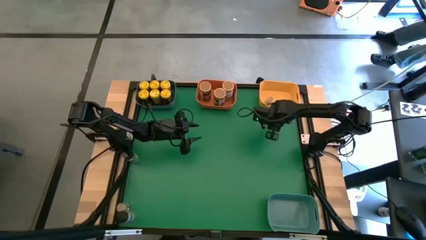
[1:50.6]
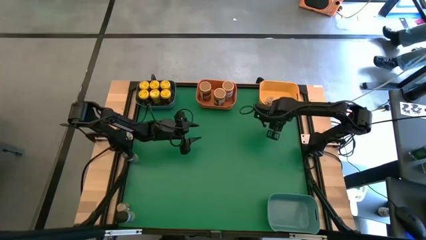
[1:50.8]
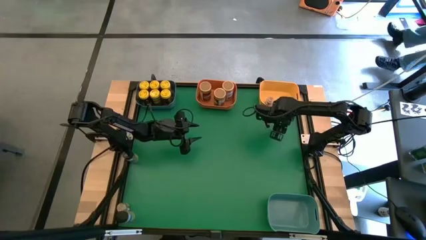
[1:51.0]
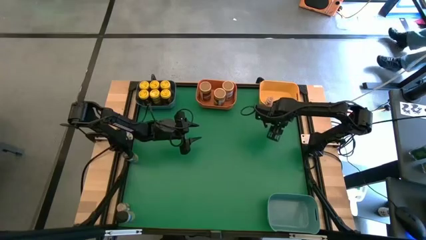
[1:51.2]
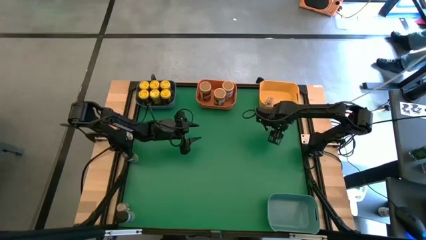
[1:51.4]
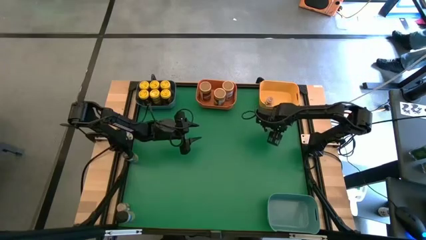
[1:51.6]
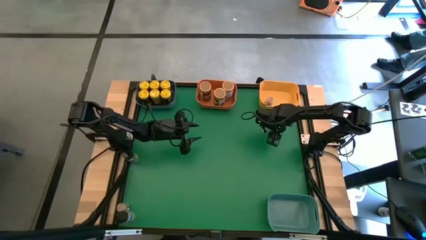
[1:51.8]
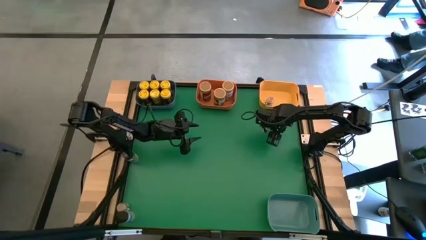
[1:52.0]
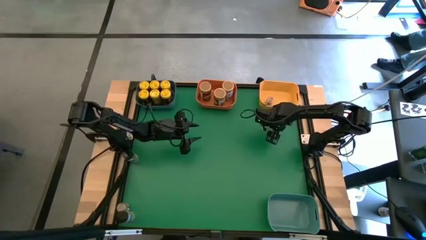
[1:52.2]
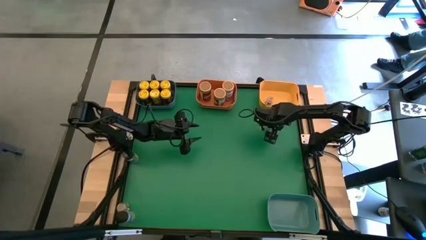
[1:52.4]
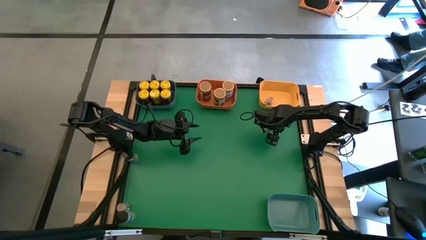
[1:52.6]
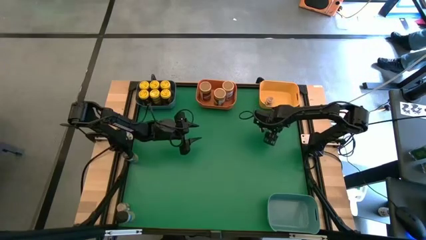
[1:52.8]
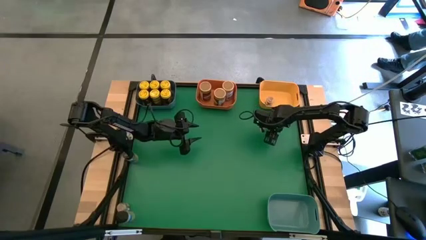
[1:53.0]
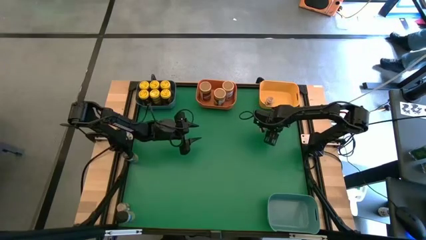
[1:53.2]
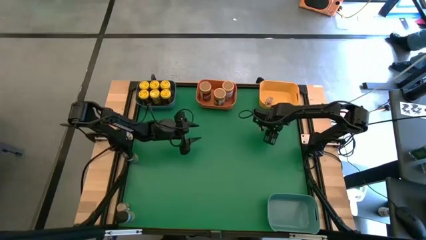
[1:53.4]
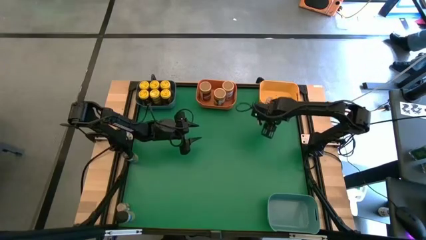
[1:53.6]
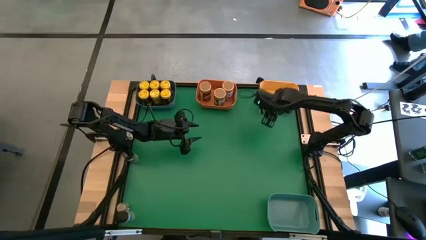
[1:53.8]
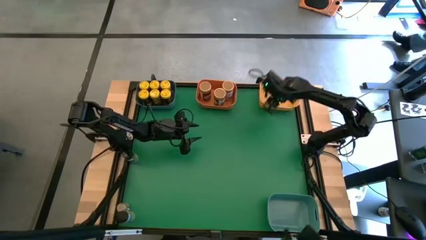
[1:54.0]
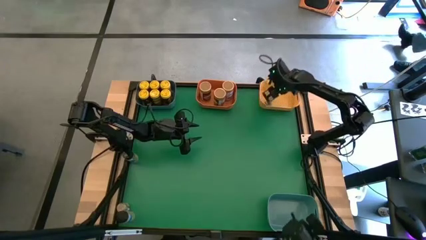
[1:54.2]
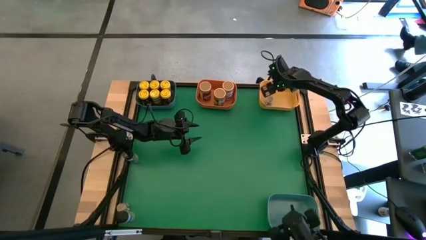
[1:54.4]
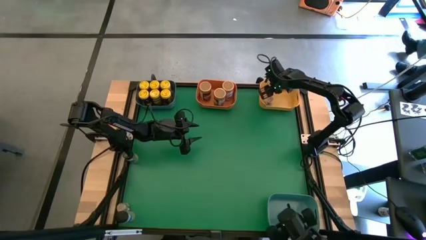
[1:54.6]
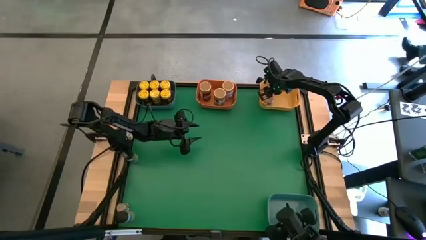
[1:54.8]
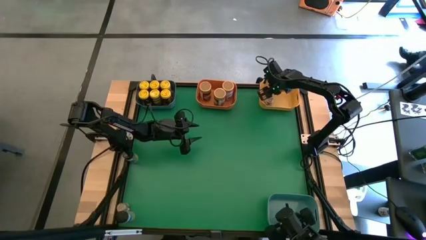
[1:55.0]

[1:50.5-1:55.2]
Task: Sort spices by type
Put the brown seasoning bottle into the yellow bin

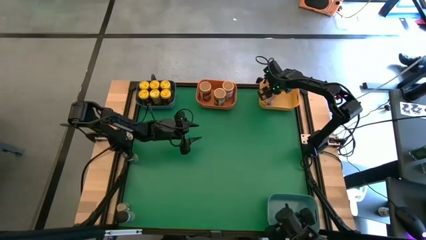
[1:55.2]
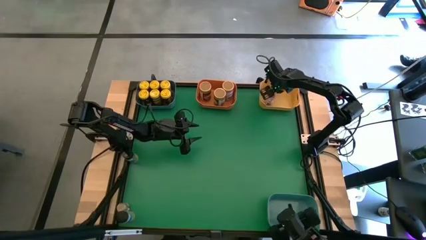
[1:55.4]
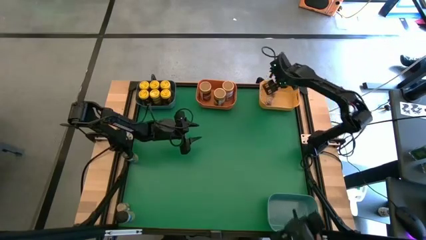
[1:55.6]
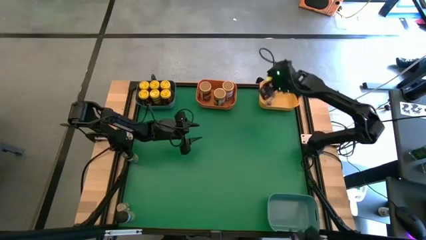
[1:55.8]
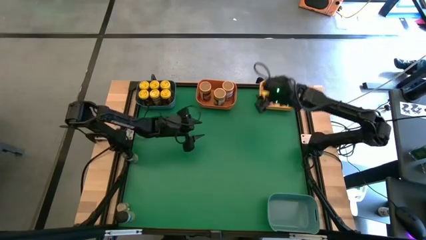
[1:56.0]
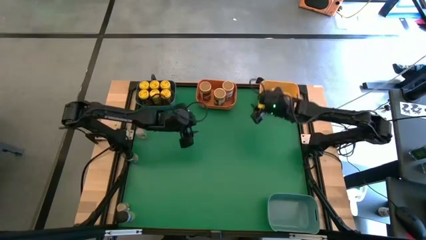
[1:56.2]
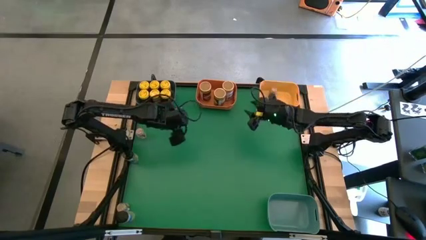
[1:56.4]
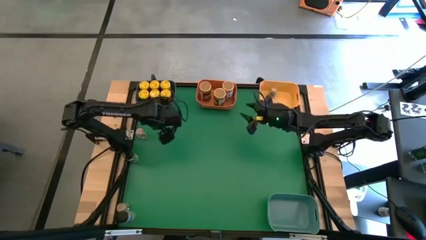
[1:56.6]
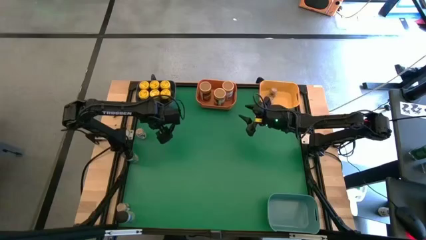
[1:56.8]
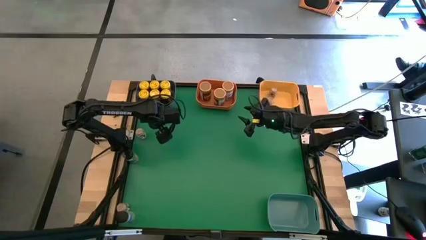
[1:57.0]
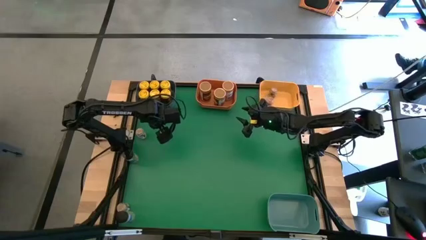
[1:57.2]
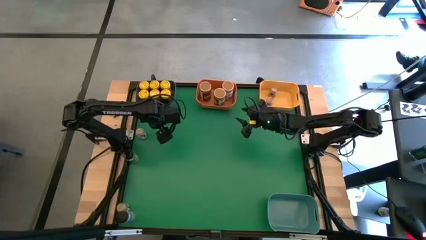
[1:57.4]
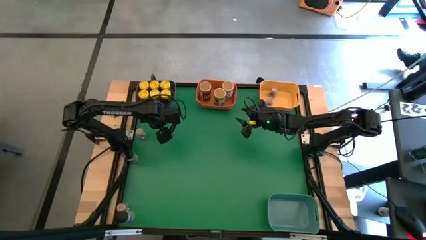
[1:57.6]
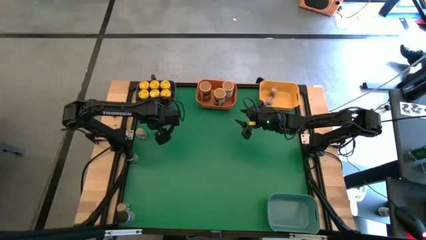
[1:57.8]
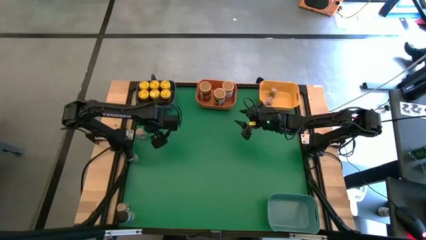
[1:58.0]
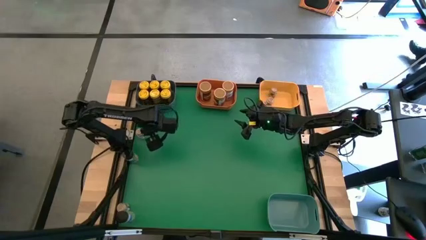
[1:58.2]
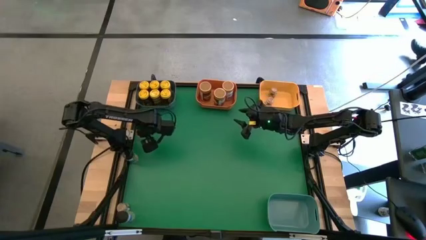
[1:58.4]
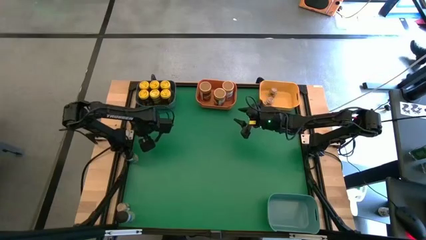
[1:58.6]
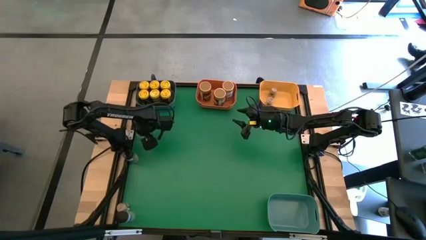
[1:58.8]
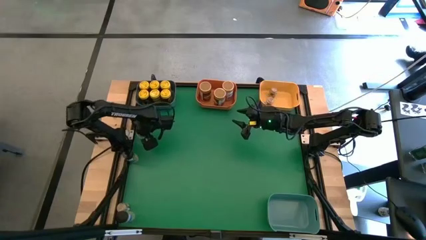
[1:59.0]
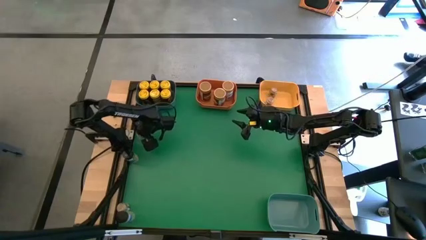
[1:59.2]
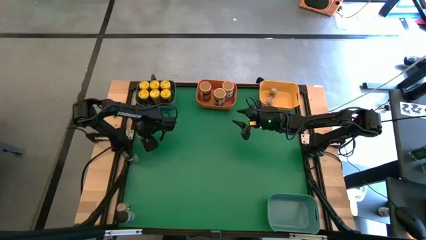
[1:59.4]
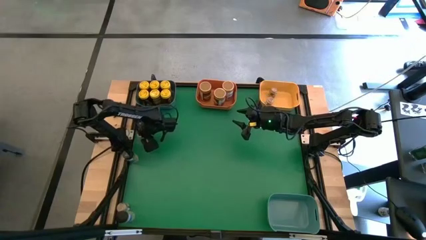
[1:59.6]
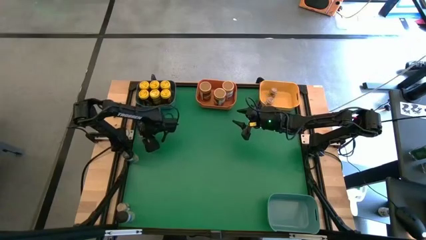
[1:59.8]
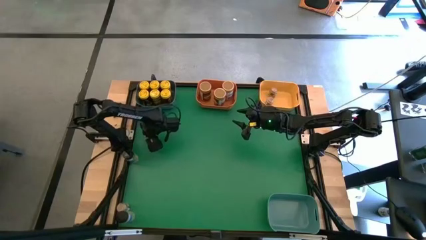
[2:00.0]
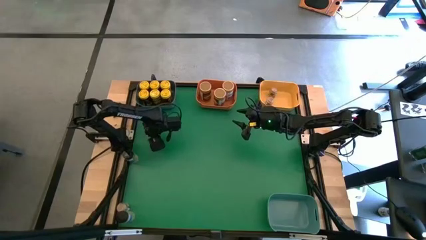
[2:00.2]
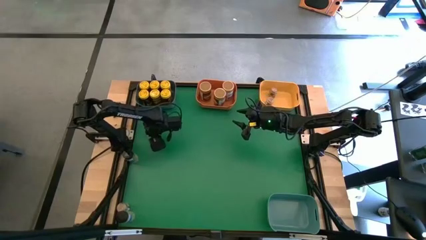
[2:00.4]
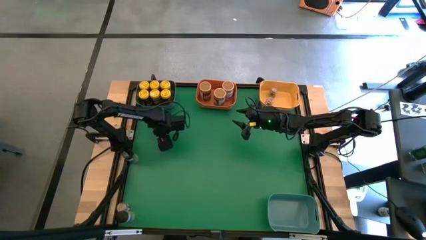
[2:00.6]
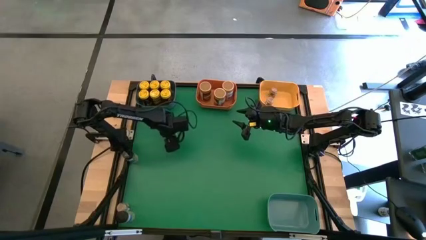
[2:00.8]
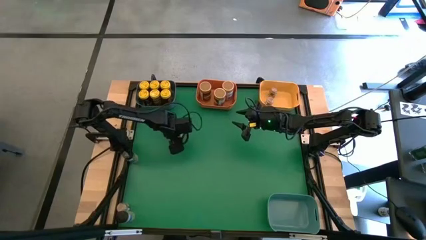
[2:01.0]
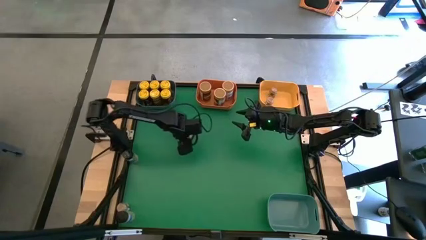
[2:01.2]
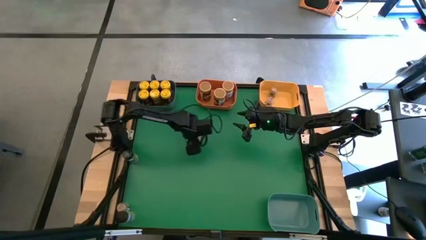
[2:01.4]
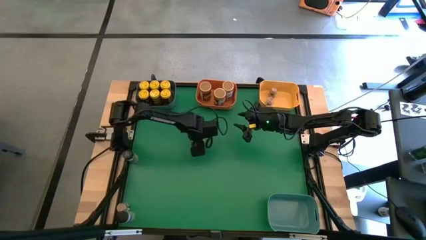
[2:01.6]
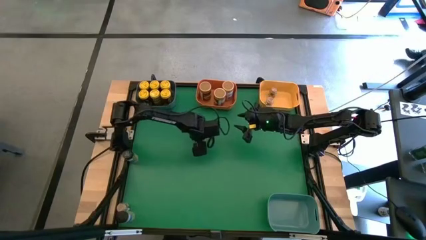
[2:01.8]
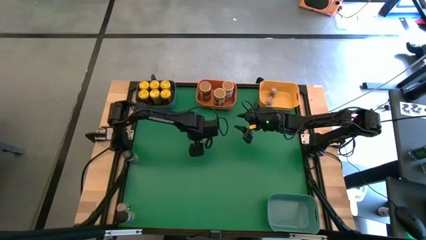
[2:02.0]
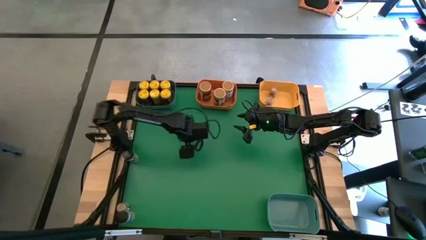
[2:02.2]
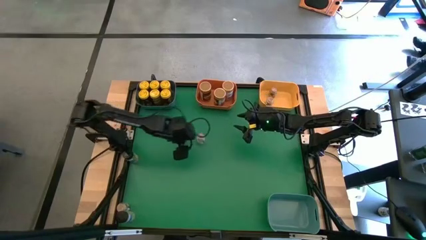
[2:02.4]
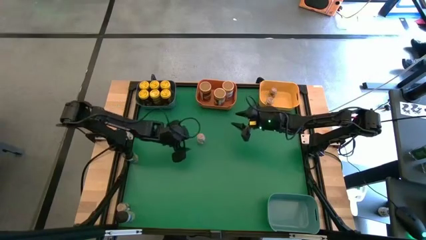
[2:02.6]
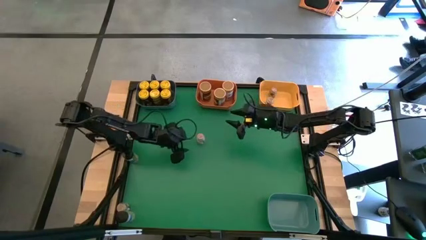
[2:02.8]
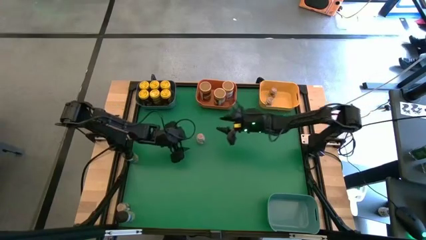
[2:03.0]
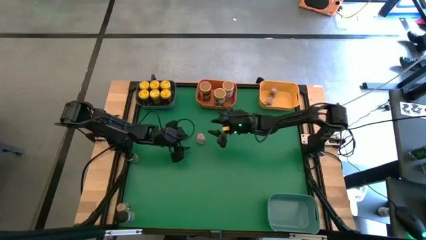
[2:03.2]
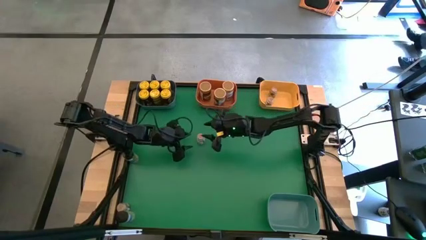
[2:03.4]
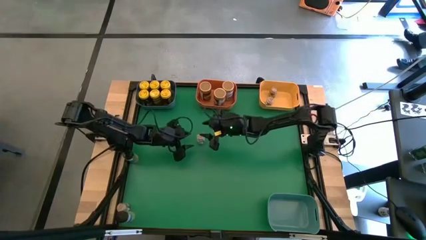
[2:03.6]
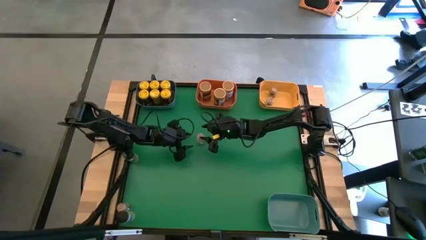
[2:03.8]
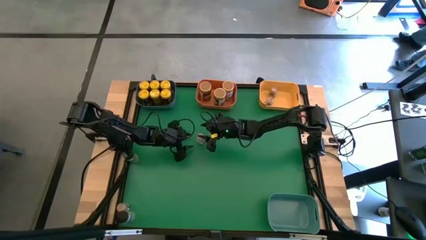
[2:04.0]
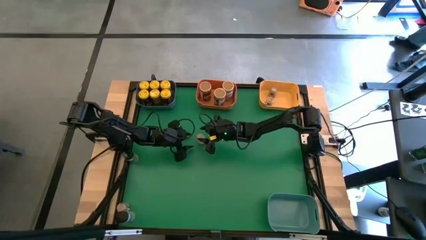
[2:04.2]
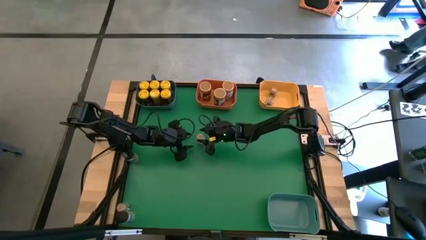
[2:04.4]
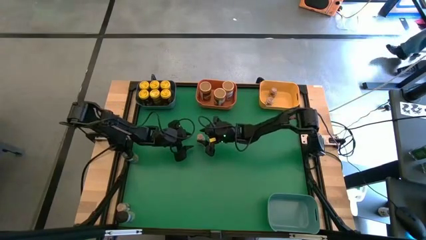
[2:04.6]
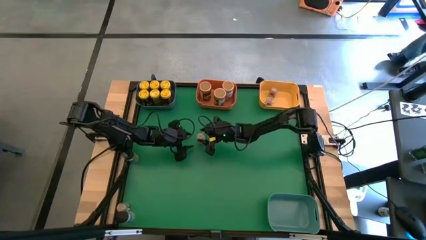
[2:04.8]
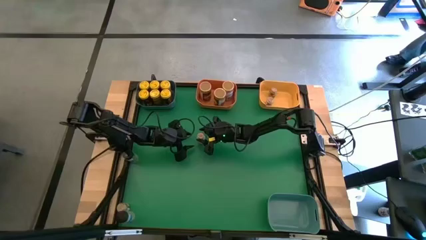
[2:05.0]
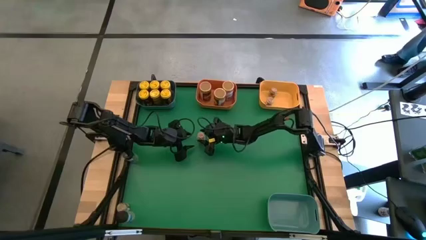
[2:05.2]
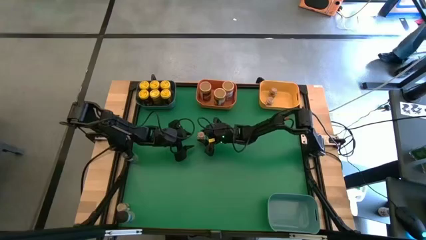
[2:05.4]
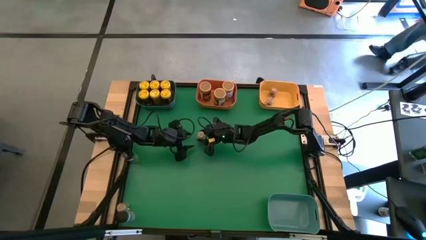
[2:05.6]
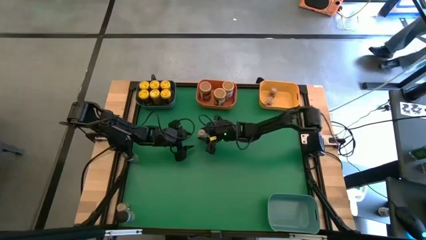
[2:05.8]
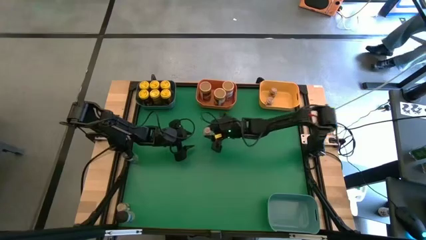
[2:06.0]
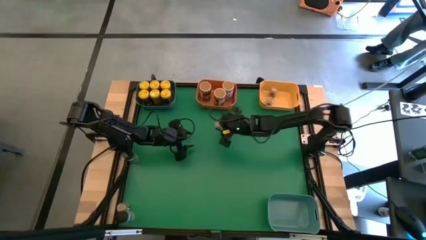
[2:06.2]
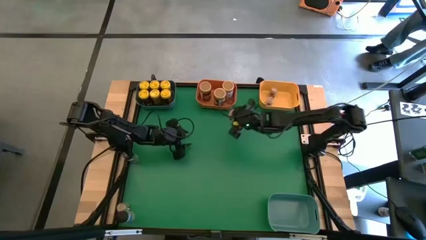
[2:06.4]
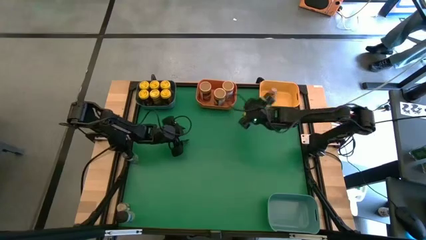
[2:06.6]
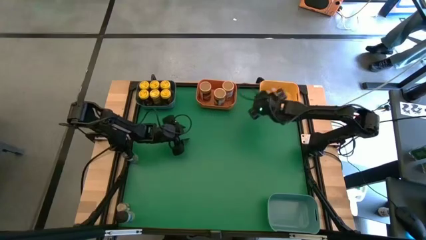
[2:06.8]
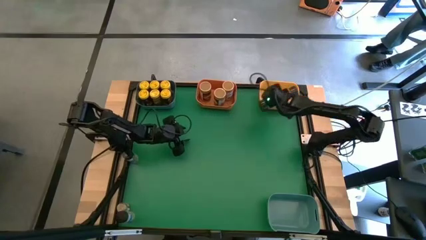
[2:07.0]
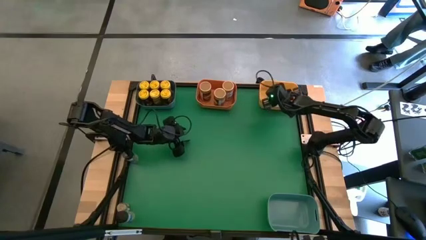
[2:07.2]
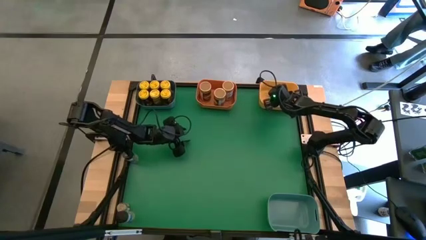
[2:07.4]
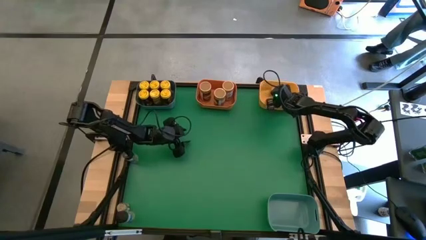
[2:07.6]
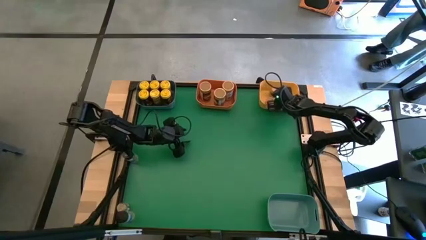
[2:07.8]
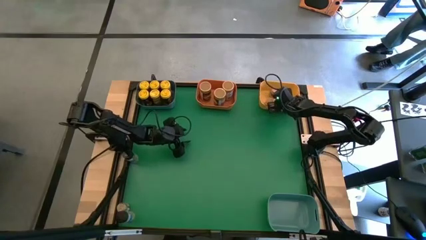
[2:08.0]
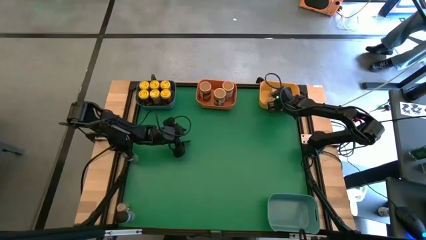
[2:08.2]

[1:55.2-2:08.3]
Put the brown seasoning bottle into the yellow bin
